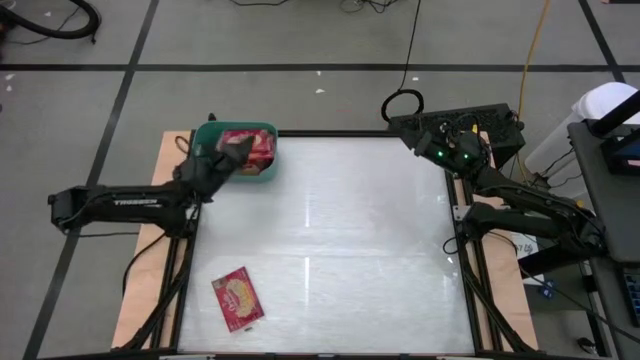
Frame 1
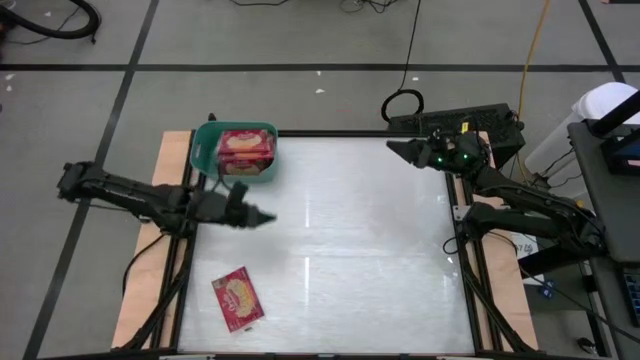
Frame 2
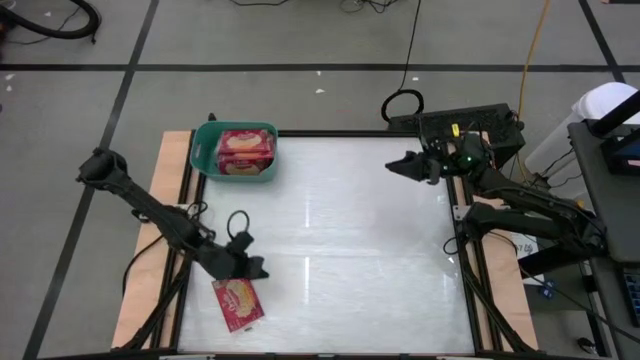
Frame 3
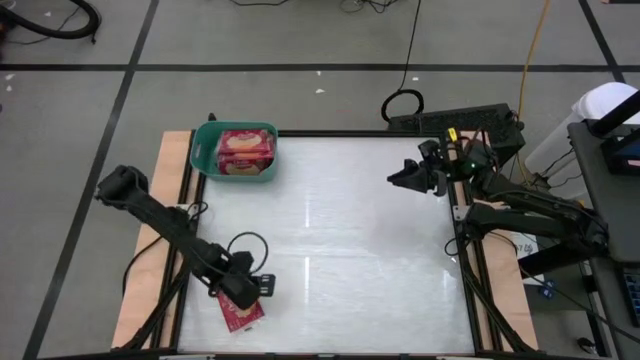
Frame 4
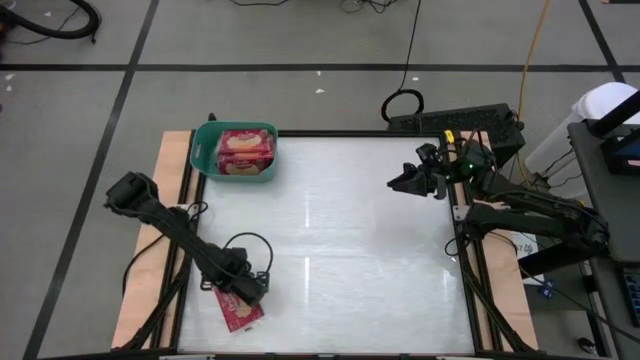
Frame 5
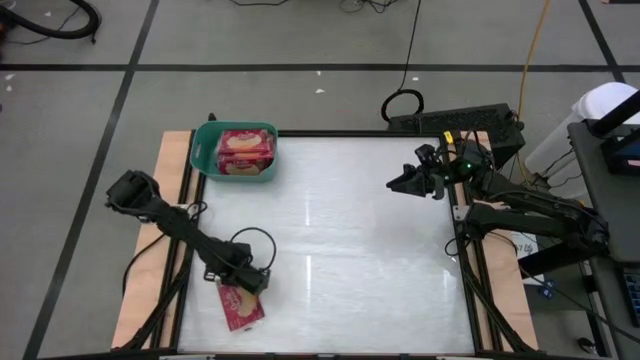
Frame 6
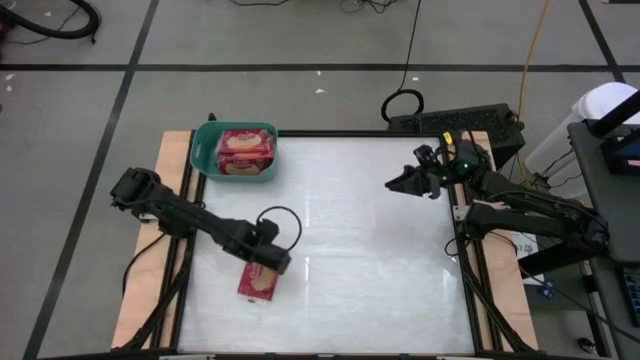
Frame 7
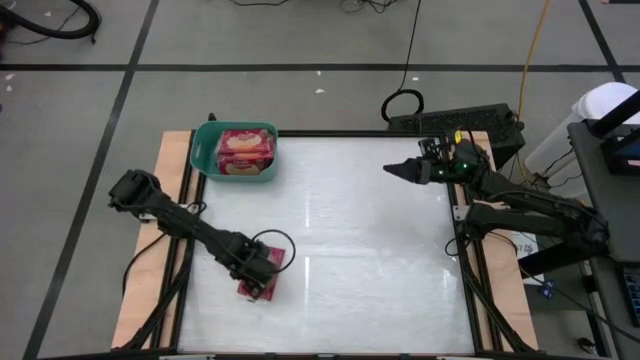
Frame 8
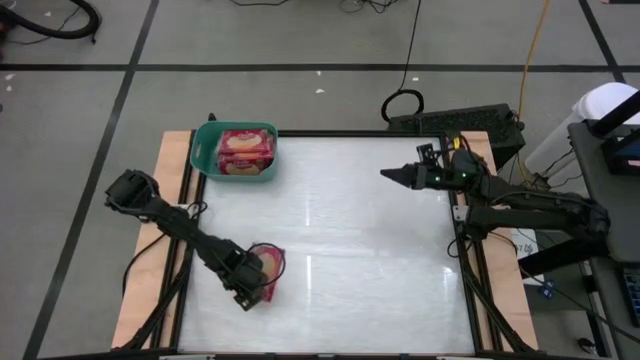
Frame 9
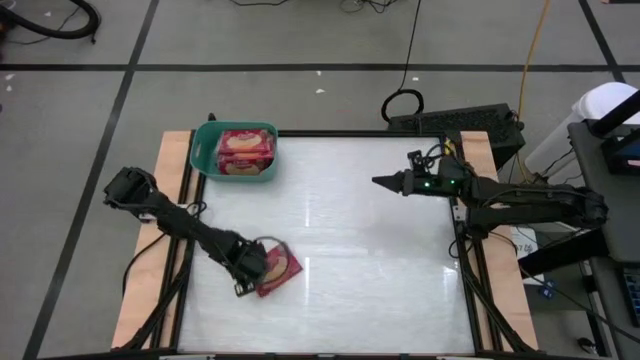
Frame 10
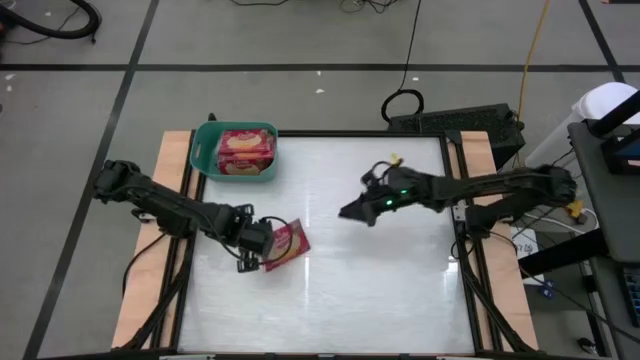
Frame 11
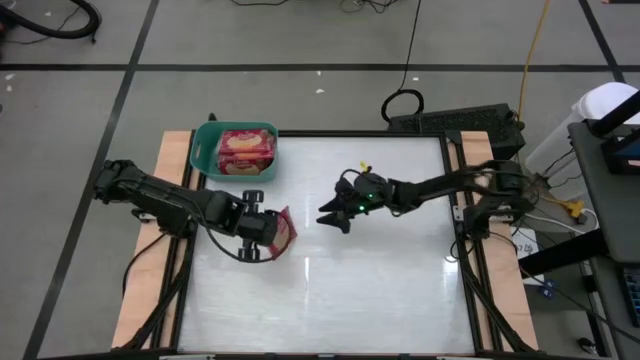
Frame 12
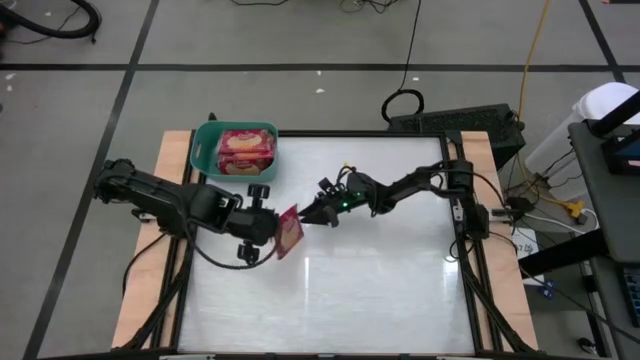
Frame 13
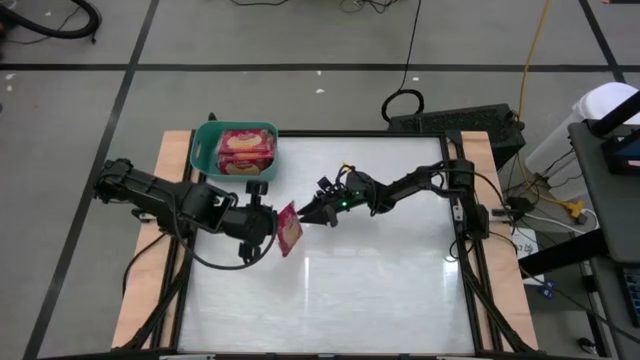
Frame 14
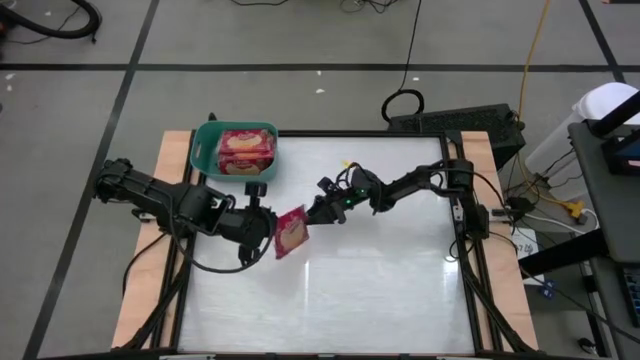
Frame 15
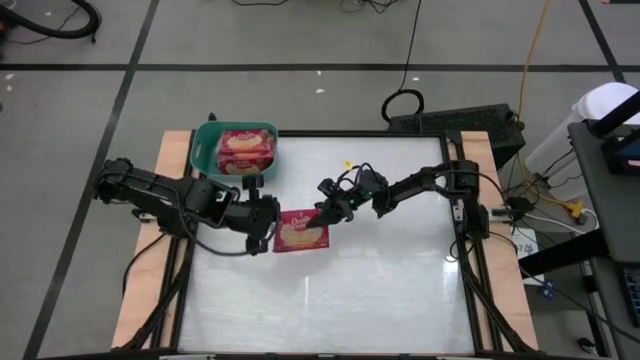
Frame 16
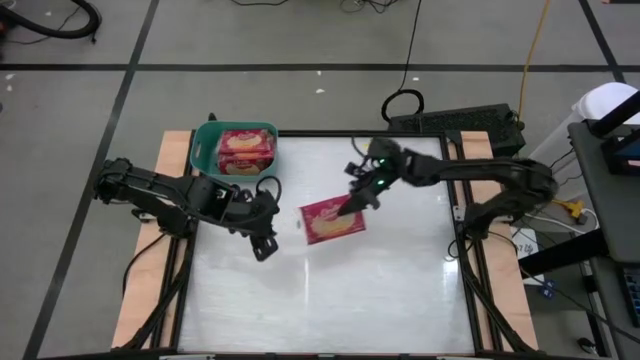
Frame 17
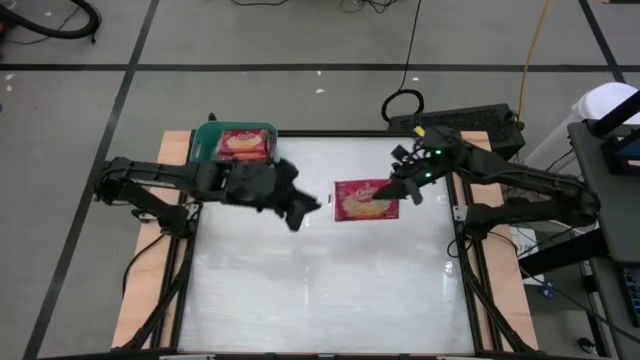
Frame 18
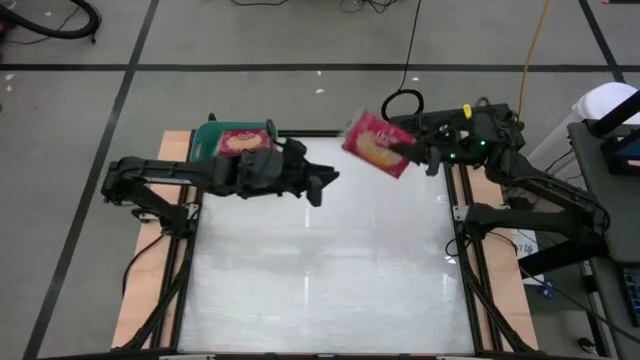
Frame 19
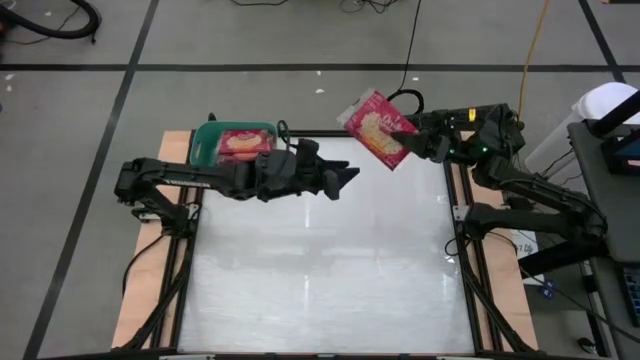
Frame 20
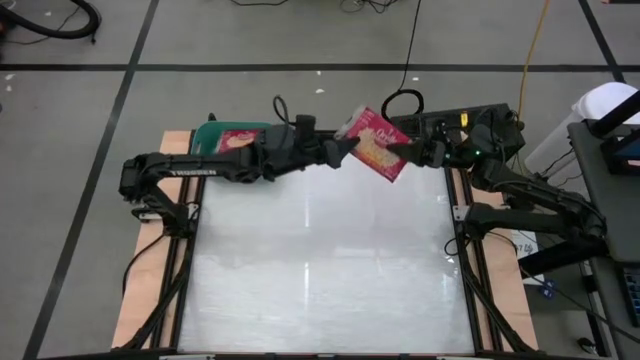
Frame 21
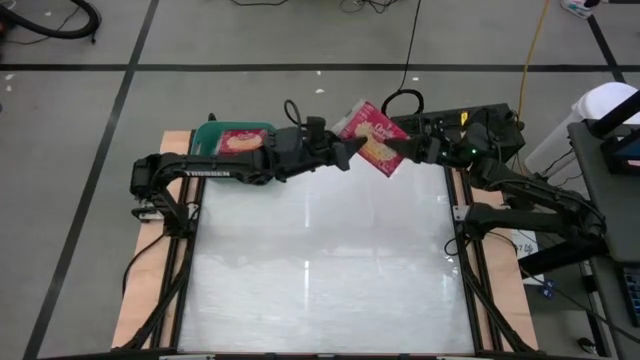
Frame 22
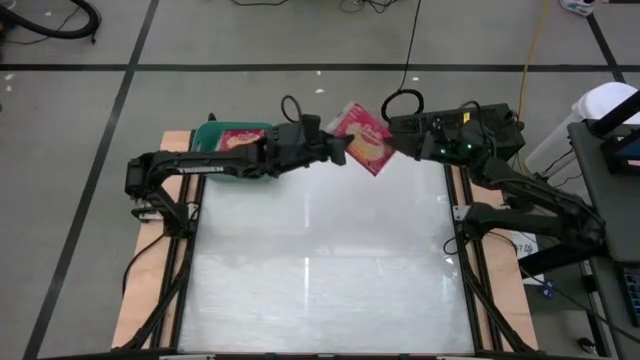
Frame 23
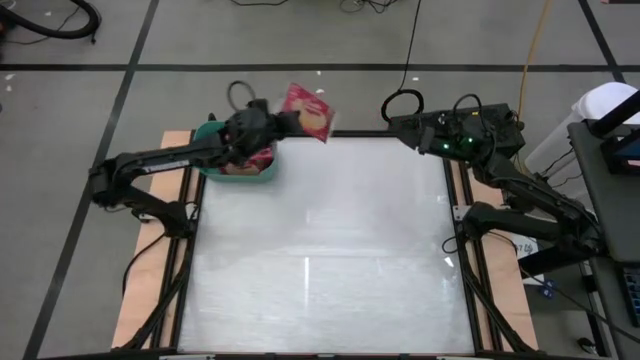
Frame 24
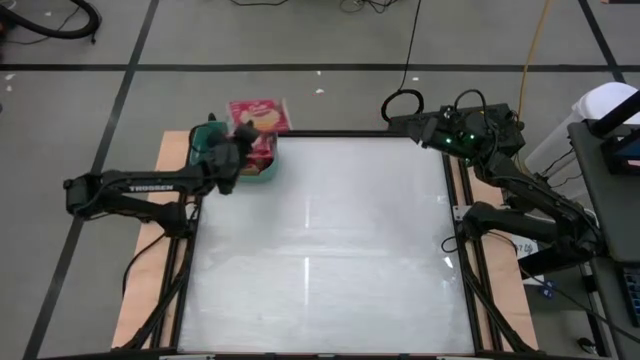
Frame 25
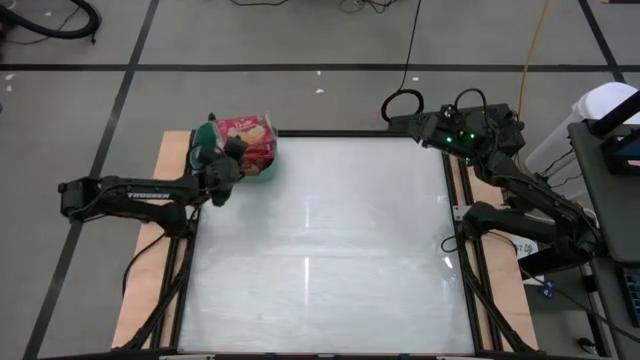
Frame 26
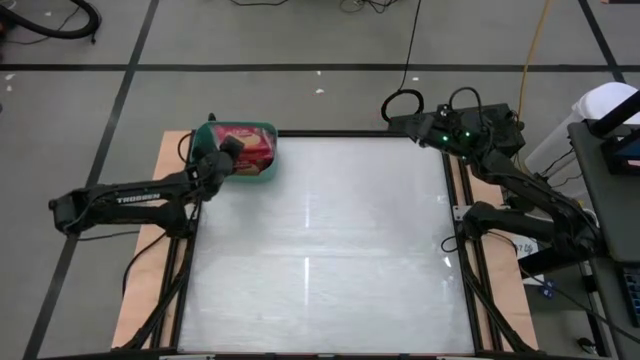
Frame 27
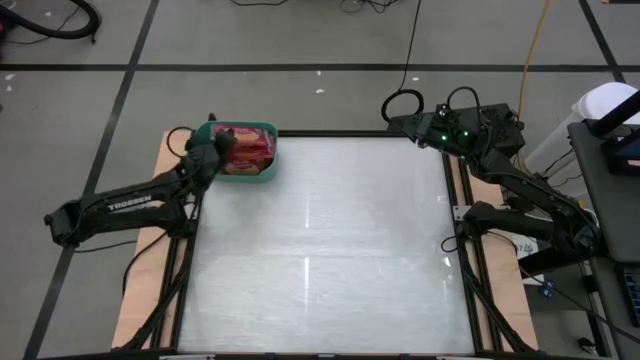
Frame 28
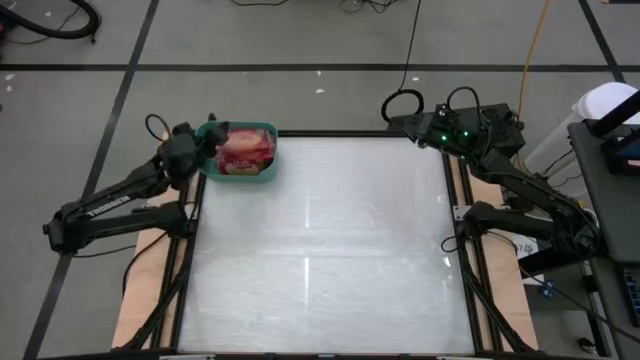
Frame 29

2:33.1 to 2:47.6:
Task: Sort popcorn bags into baskets
Put the red popcorn bag into the green bin

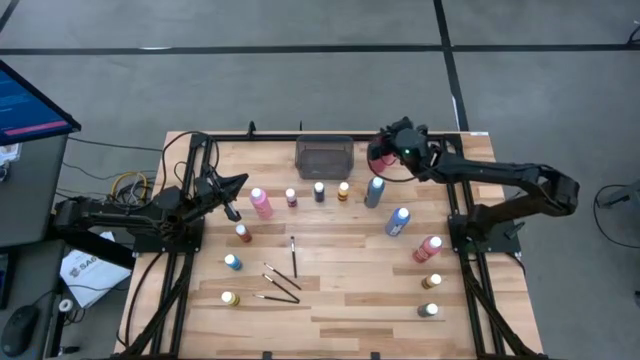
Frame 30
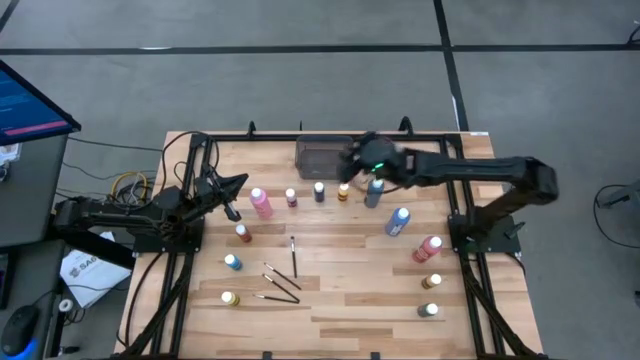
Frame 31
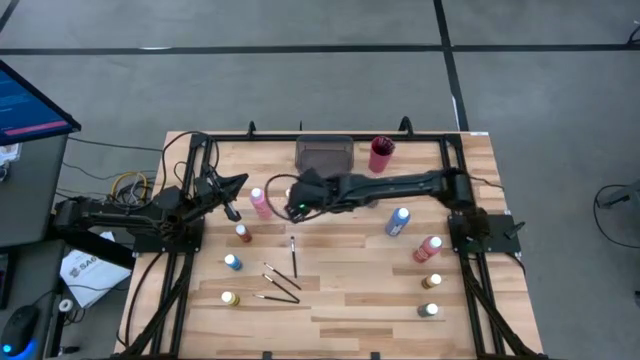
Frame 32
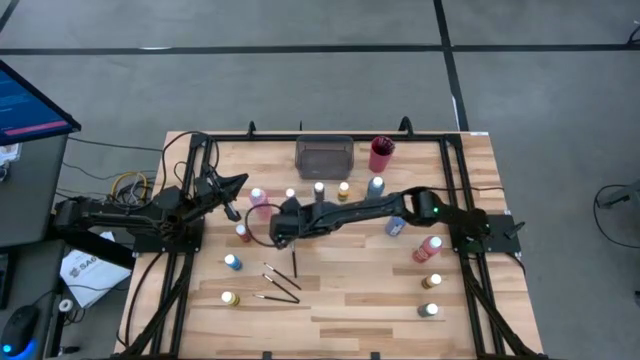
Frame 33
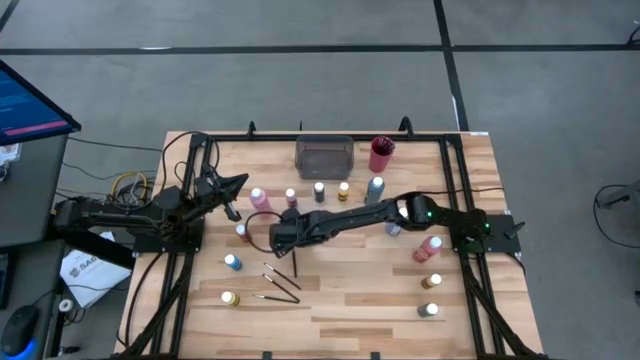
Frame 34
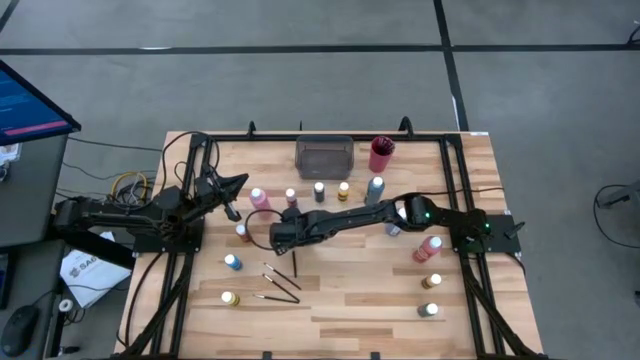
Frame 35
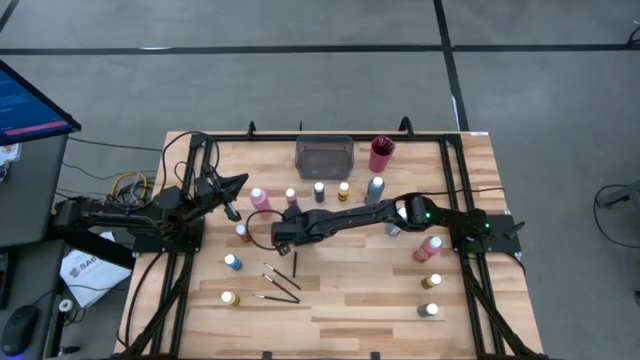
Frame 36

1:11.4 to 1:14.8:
Task: Pick & Place Paint Supplies
Put the black paintbrush into the red cup

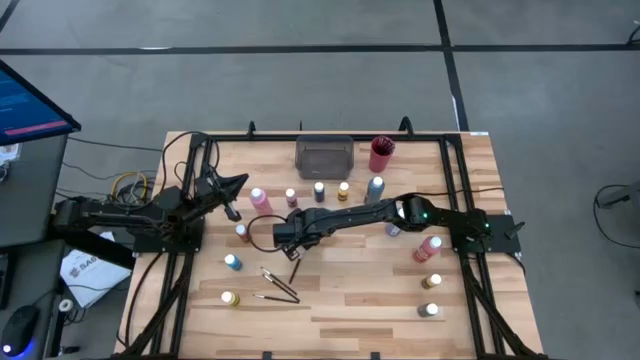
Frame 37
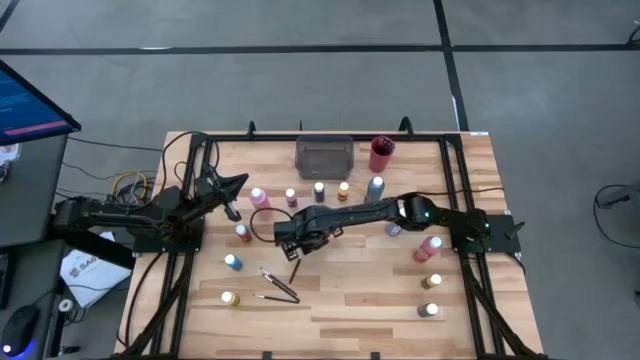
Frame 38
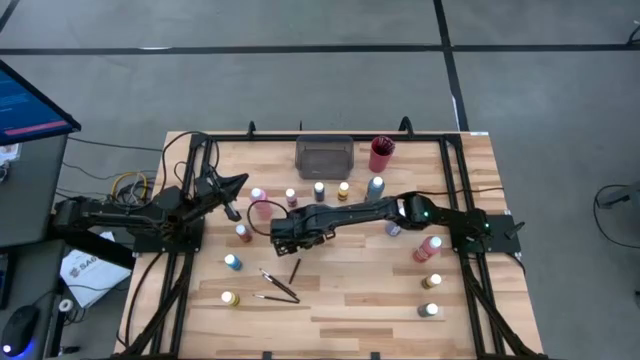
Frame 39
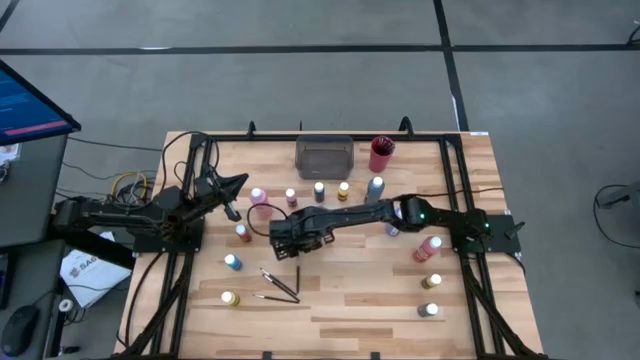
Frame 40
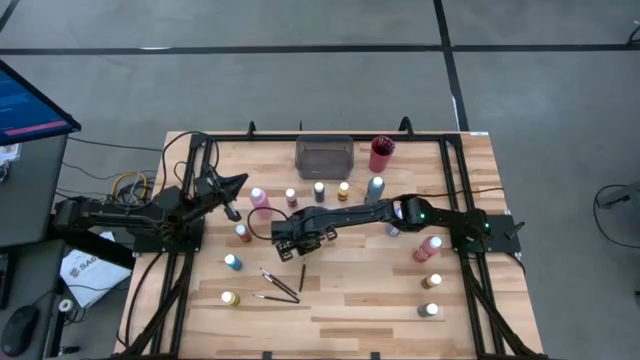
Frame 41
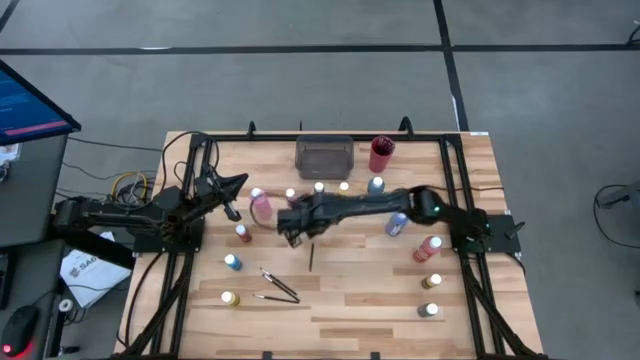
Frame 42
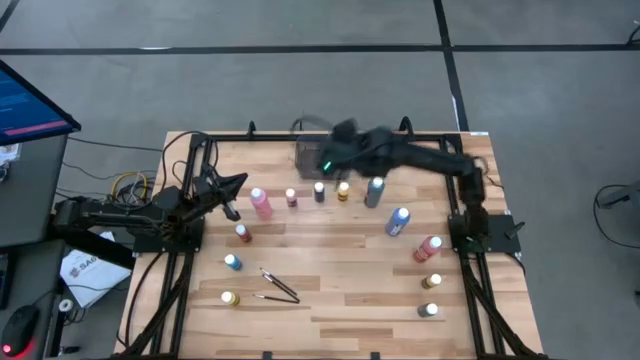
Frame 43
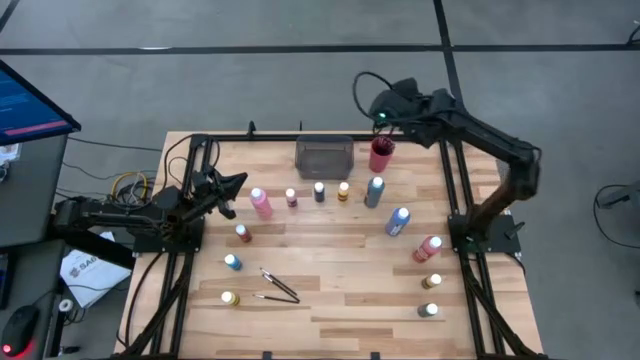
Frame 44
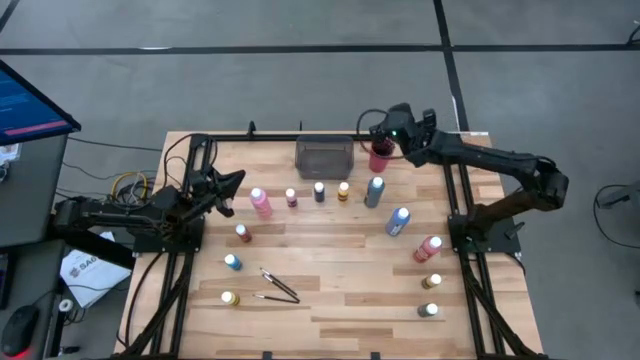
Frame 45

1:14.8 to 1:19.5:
Put the black paintbrush into the red cup
